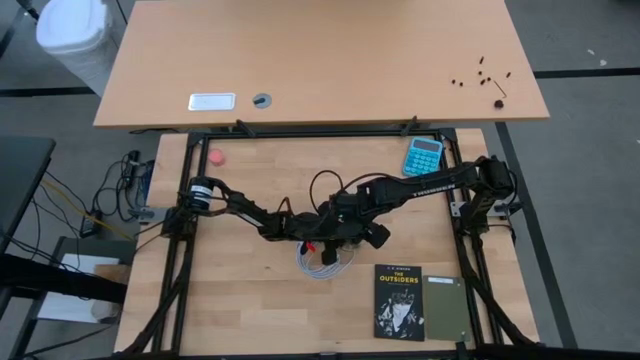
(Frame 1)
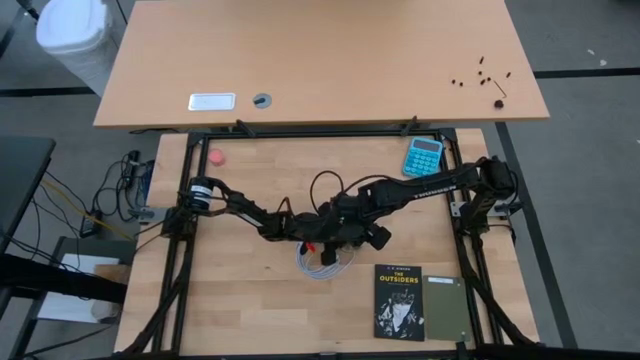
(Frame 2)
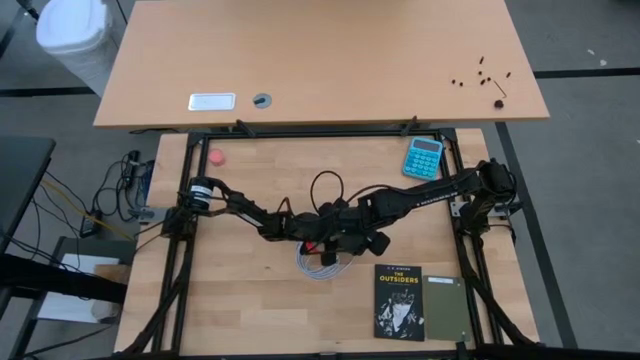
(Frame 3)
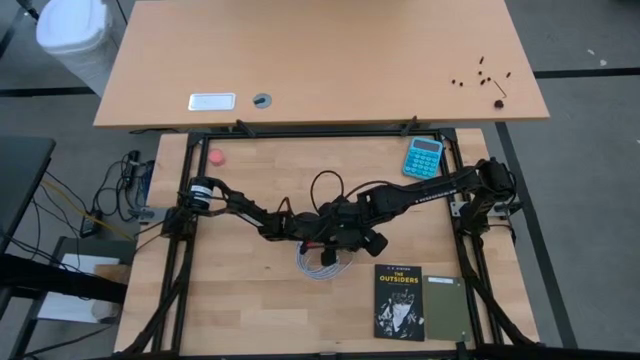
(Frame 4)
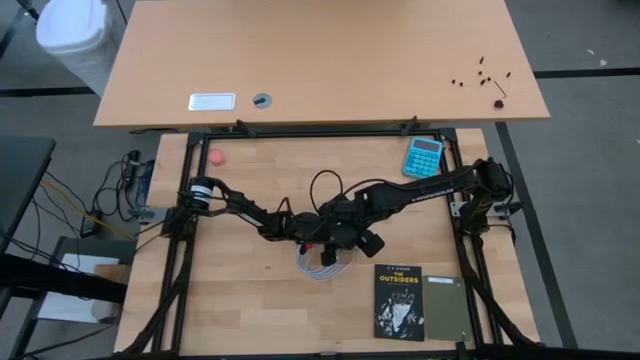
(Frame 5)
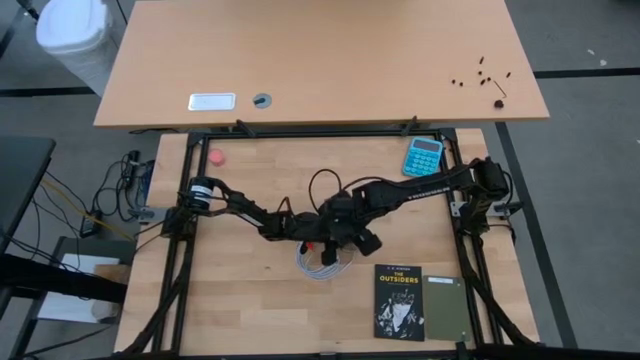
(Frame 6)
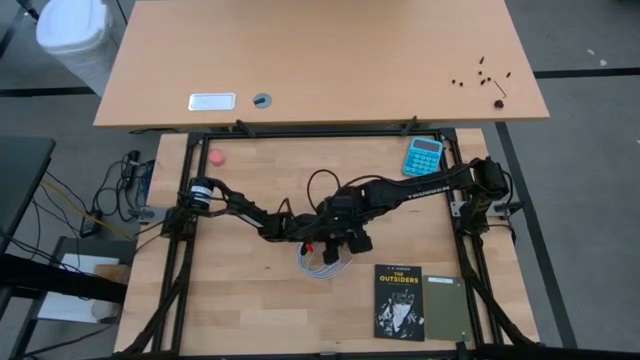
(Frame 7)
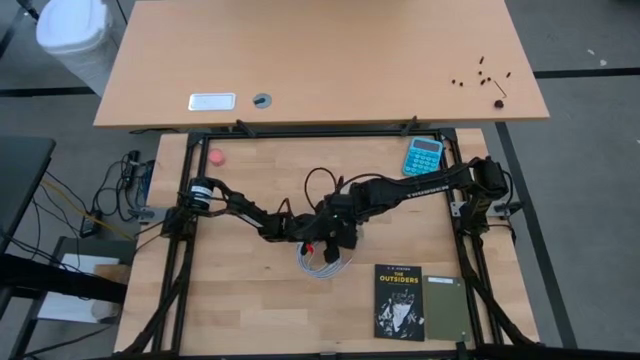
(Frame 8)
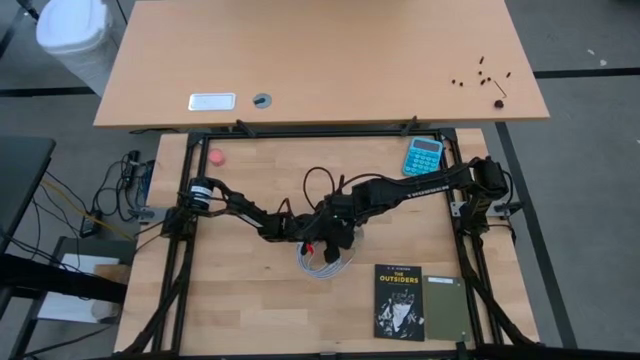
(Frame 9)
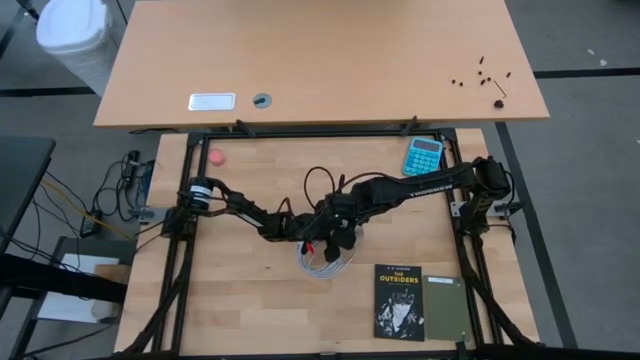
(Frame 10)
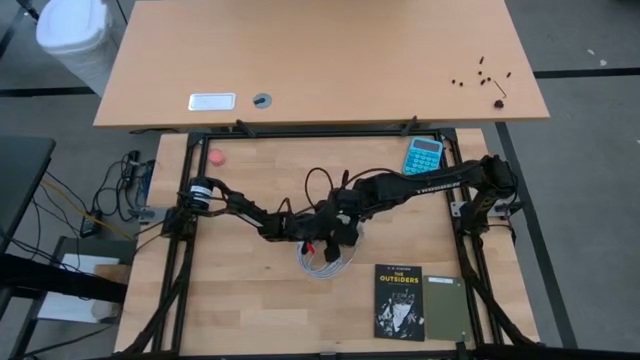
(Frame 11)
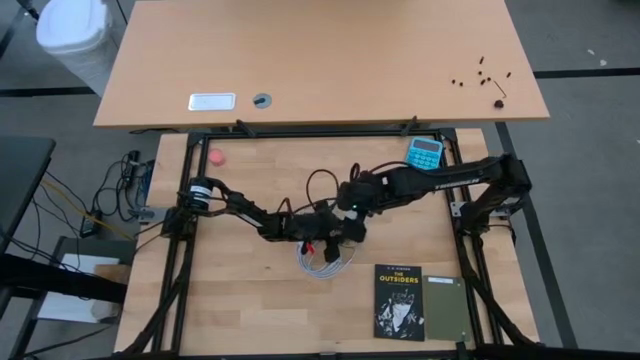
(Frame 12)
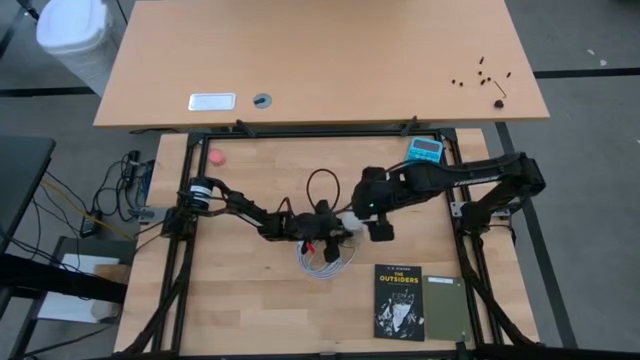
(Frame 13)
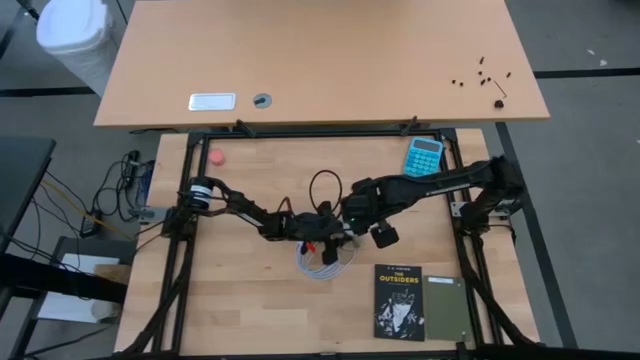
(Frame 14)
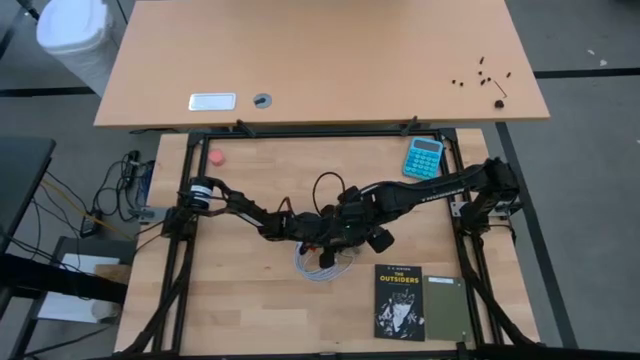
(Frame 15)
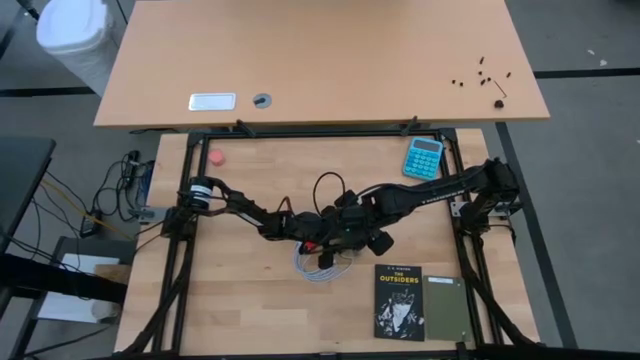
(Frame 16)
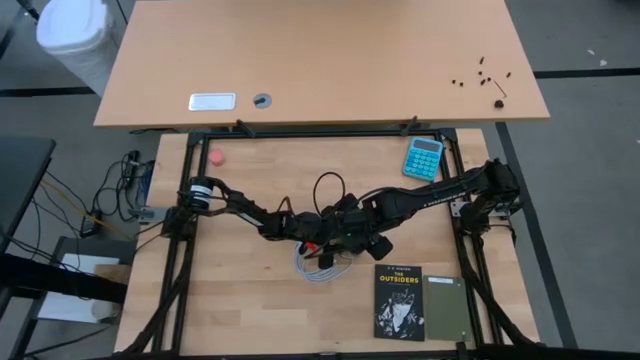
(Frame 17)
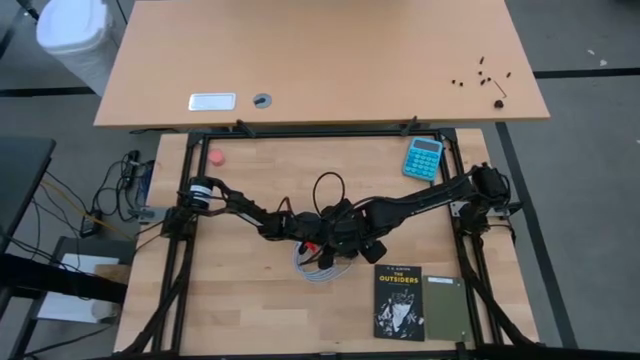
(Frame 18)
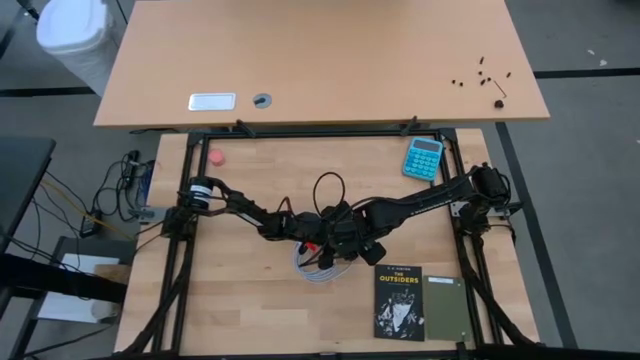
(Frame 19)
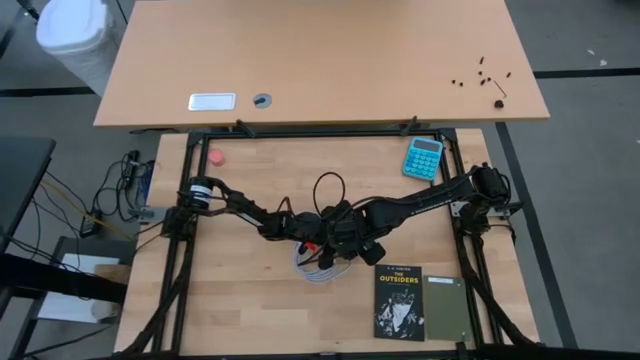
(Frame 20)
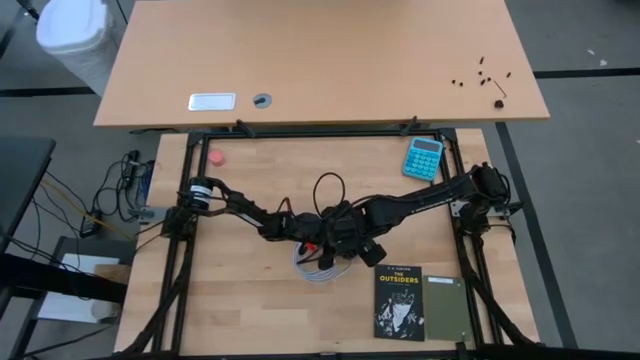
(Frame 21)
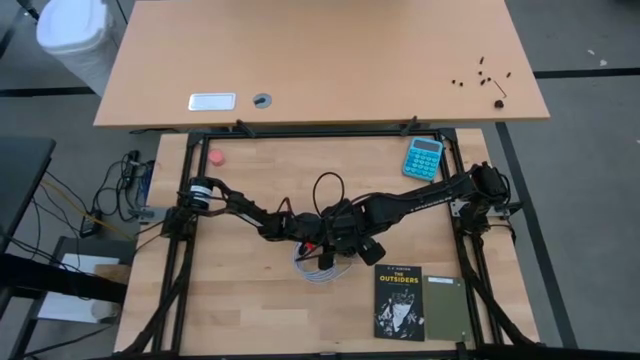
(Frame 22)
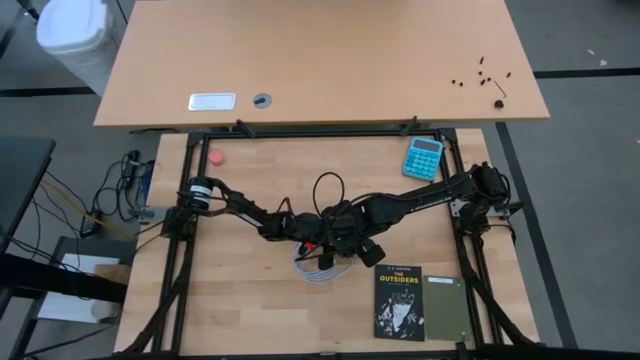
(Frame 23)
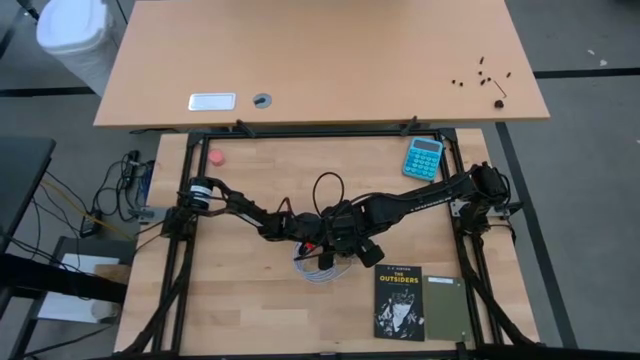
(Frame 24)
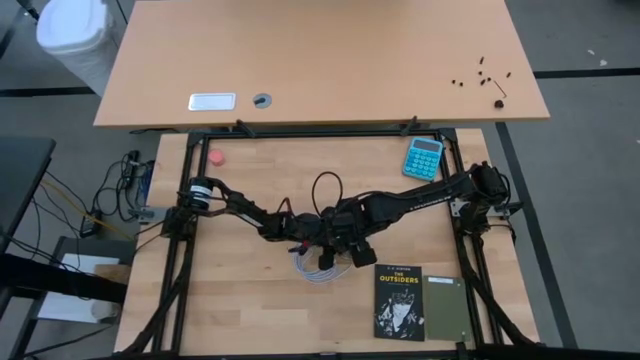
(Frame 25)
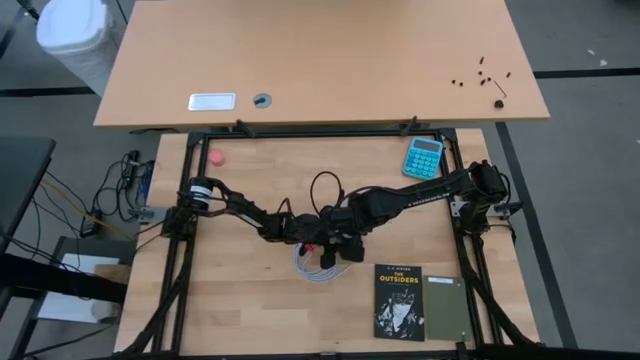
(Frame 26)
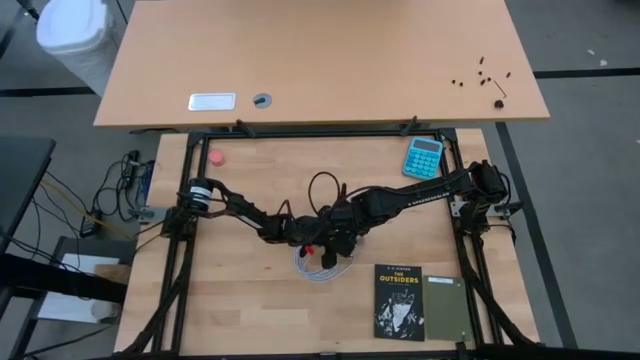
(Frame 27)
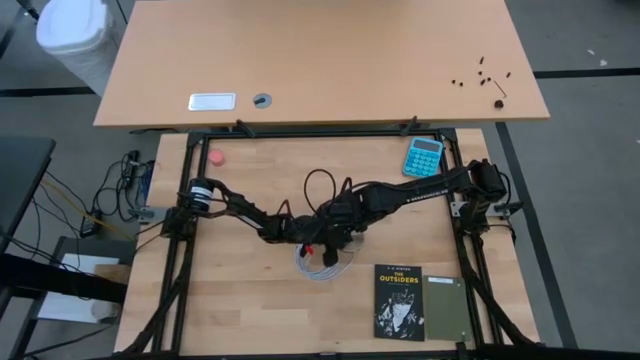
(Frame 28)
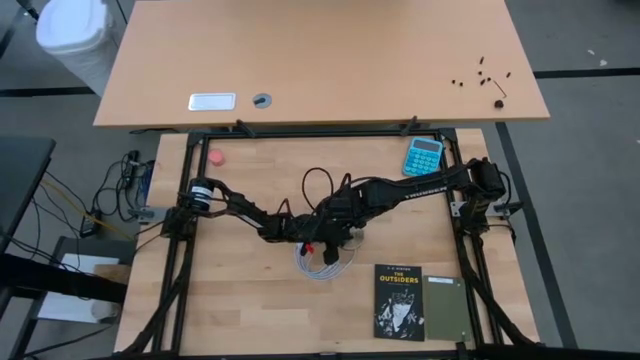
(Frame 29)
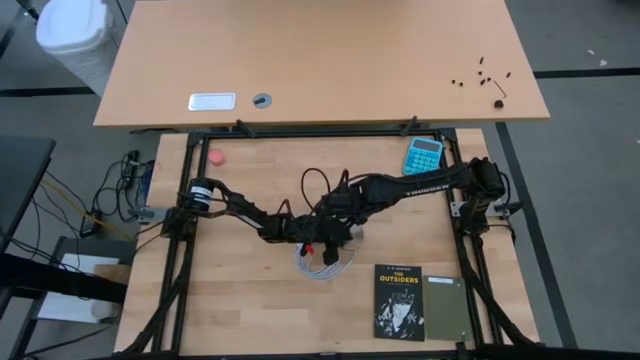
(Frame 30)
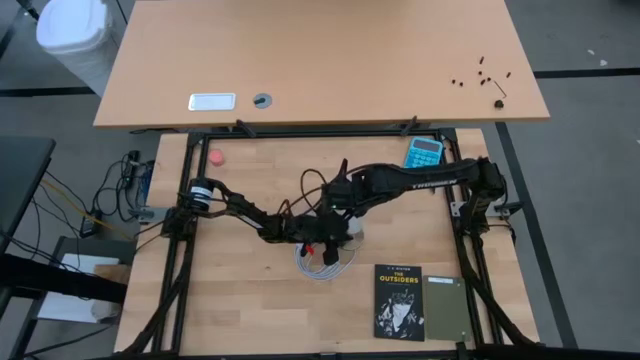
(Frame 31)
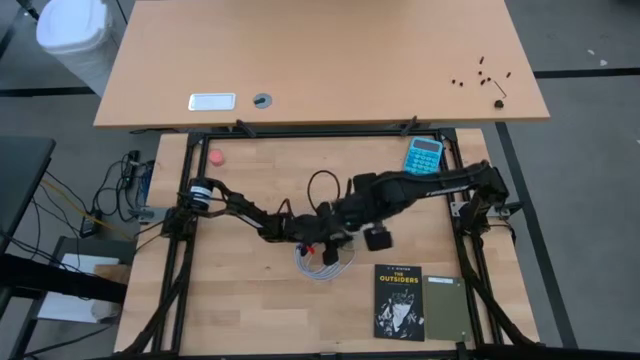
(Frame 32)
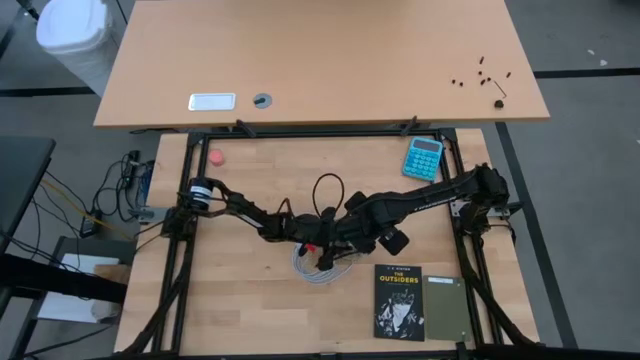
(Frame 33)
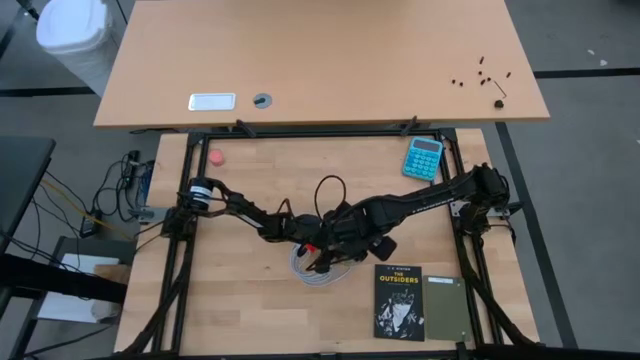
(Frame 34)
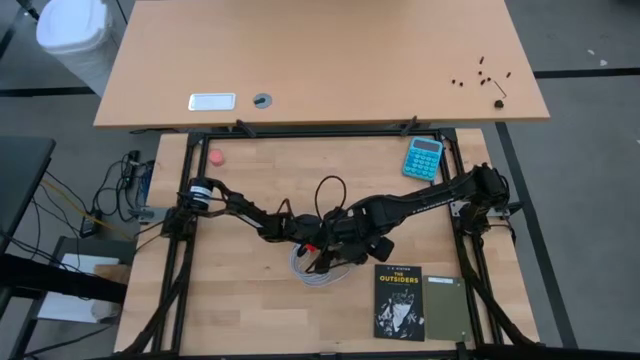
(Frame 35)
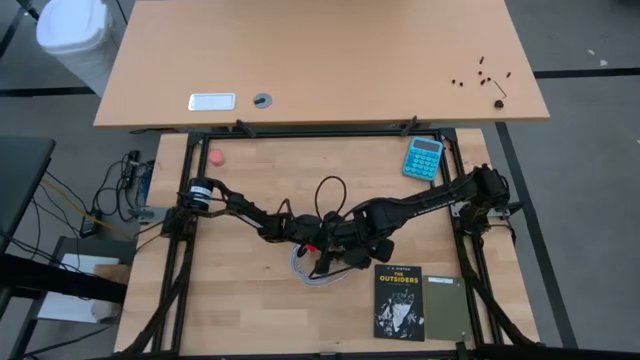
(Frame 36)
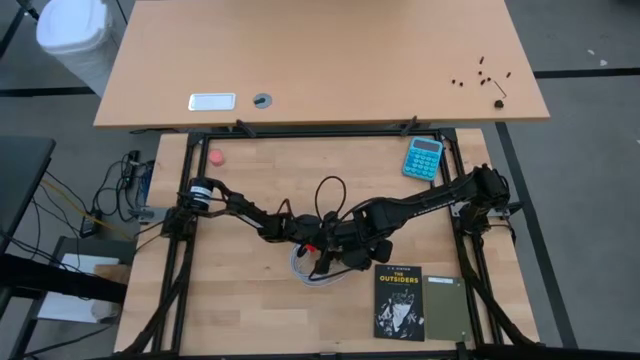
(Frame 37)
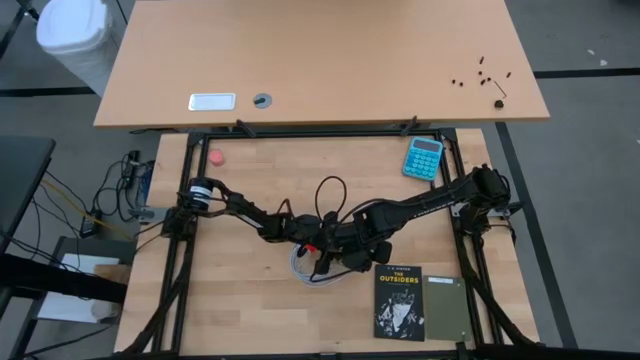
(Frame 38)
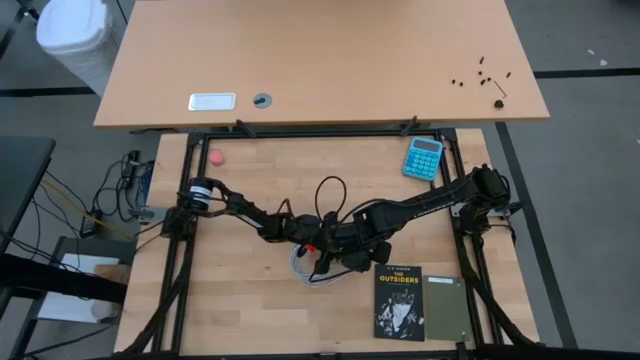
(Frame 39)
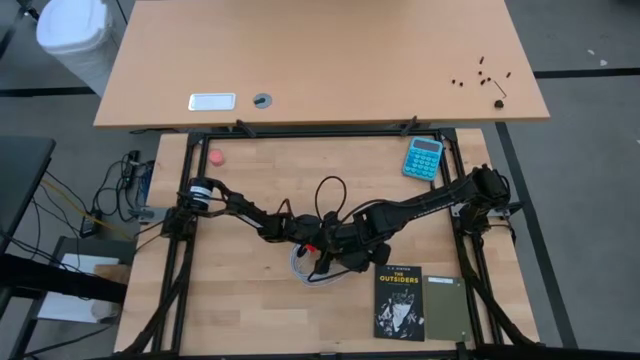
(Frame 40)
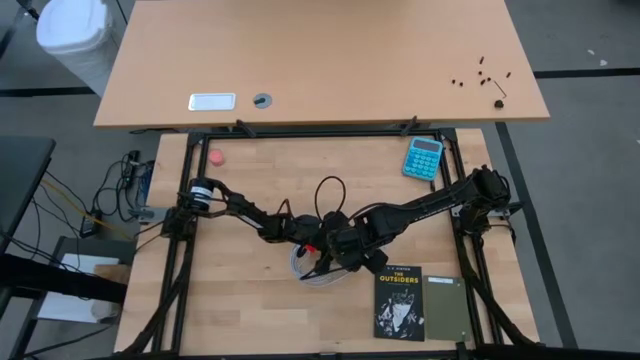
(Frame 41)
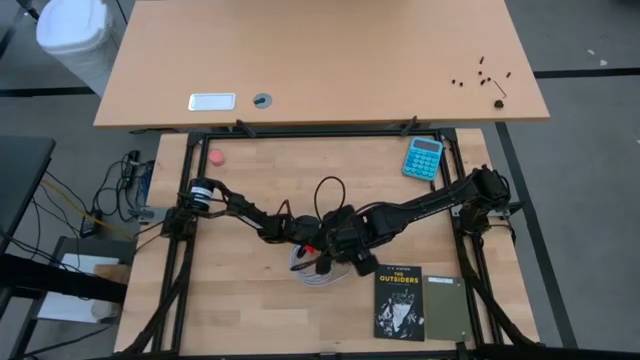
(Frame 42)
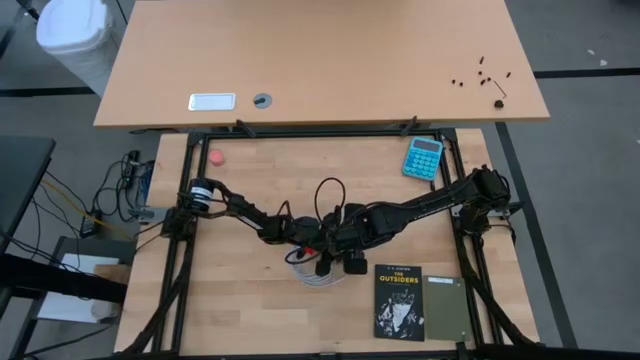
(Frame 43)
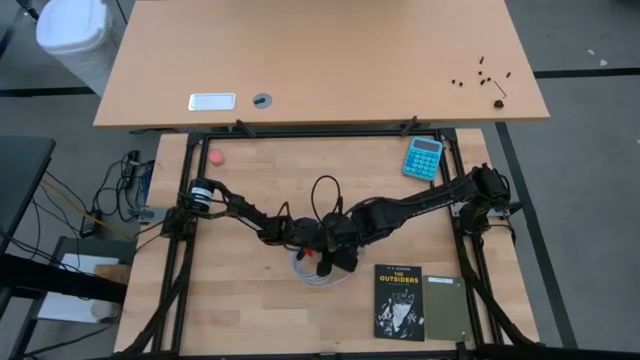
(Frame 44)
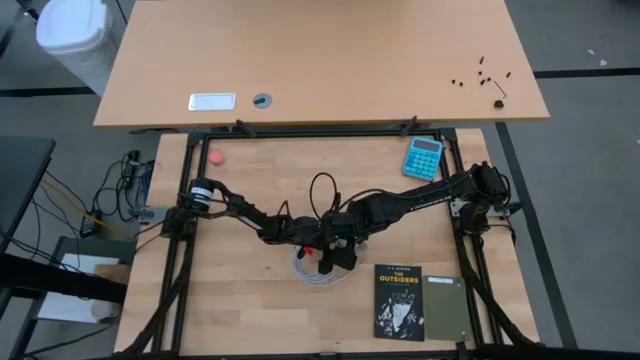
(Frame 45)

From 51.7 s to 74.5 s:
Task: Screw lightbulb
Insert the white lightbulb into the silver lamp
